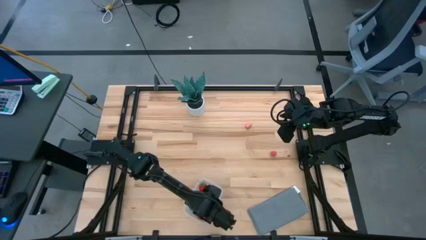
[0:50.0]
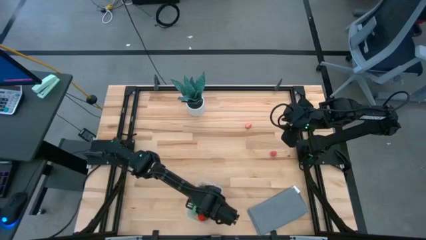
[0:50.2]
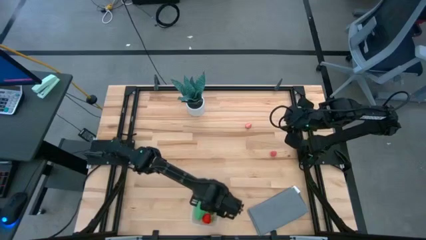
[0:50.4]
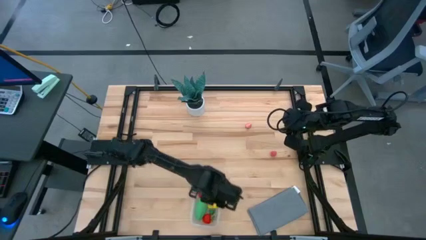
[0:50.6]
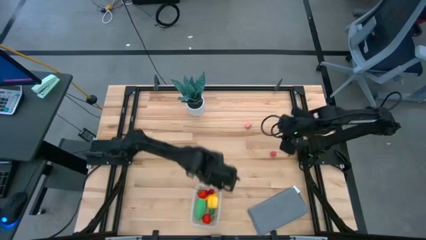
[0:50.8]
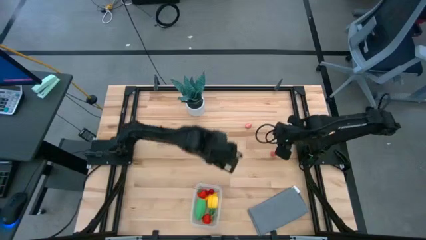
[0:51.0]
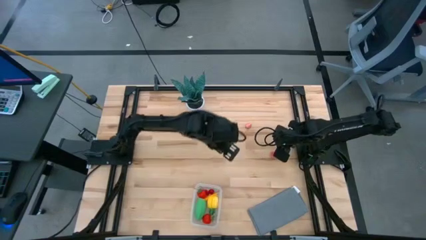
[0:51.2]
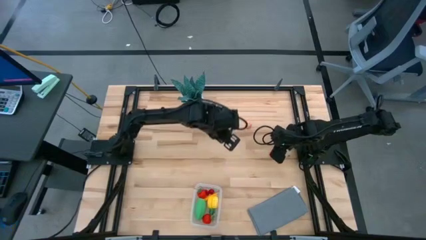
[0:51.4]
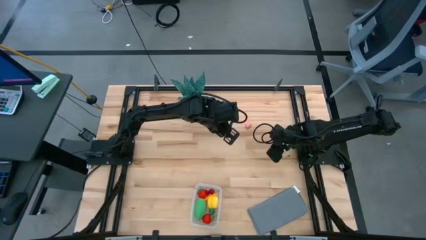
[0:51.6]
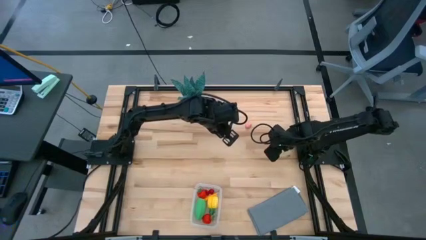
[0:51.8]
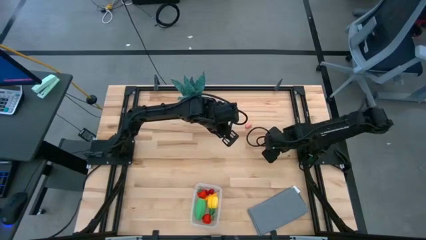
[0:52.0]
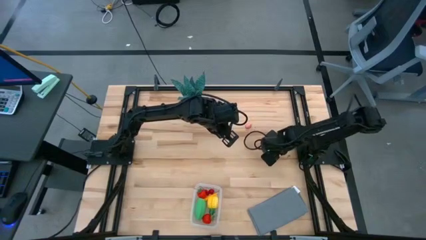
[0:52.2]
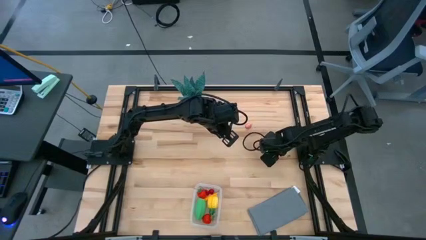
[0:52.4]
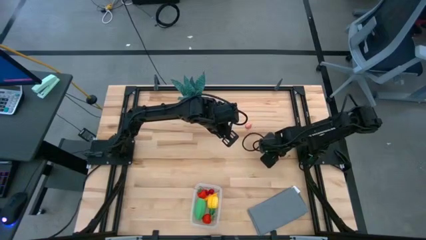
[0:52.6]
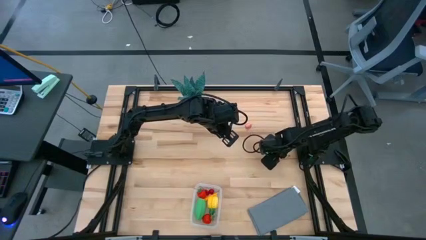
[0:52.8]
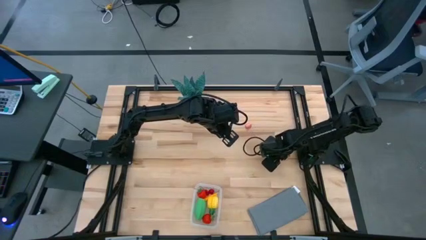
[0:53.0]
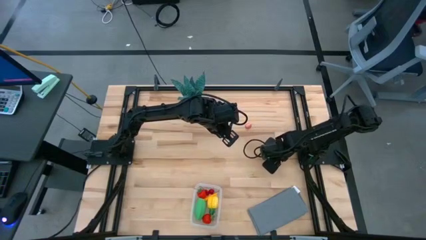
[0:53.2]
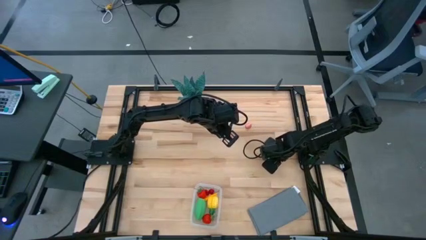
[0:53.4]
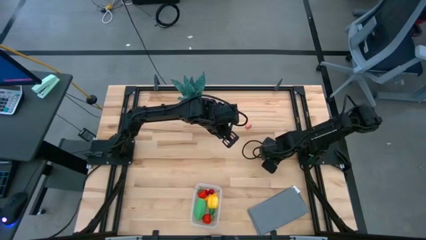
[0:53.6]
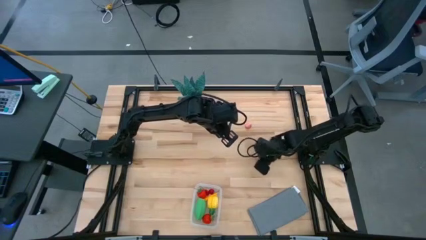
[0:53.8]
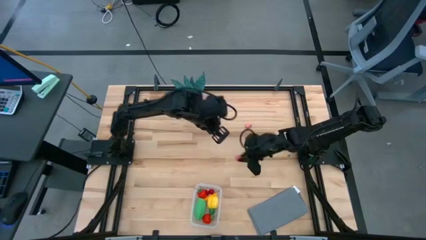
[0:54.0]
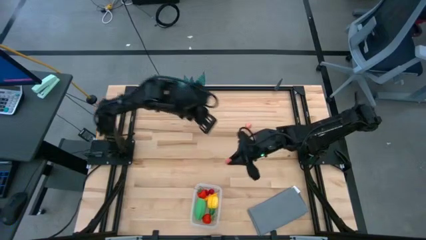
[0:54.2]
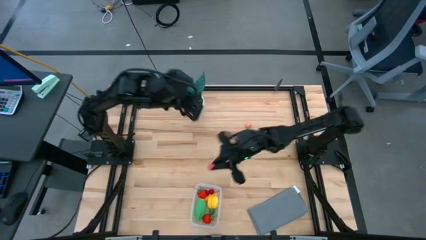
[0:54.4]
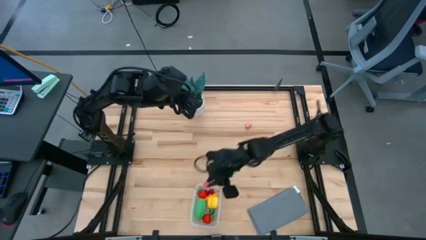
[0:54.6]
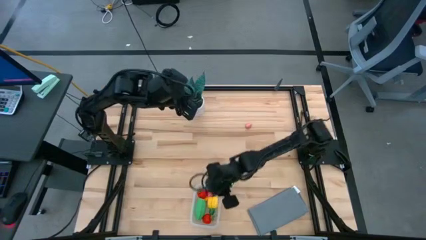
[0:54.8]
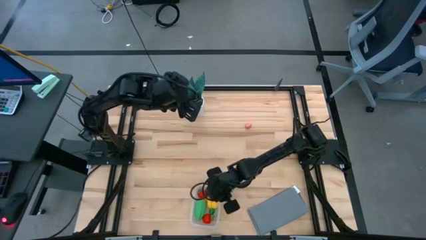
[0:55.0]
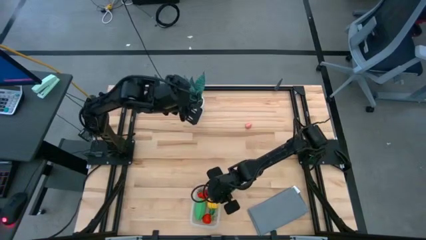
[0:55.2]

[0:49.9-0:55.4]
Task: Pick and placing Produce into tupperware
Put the bottom pink peach into the transparent bin

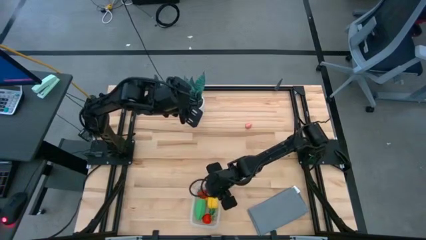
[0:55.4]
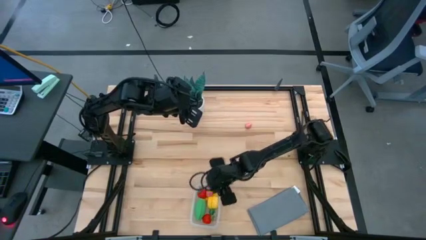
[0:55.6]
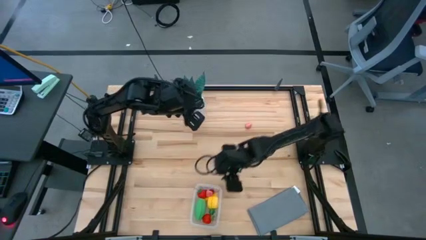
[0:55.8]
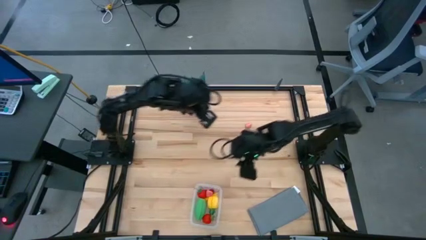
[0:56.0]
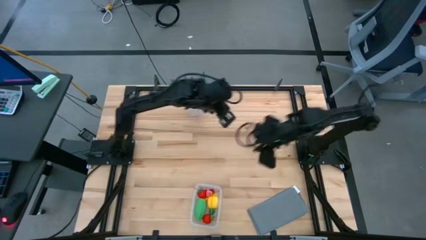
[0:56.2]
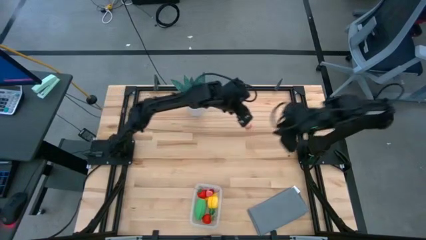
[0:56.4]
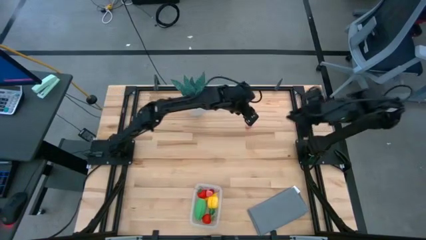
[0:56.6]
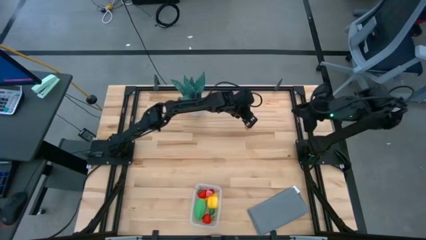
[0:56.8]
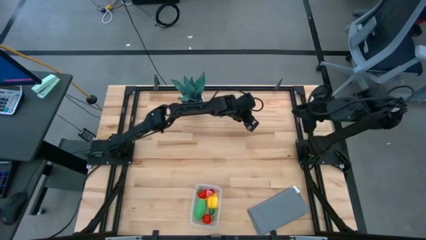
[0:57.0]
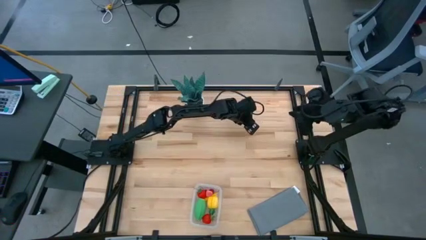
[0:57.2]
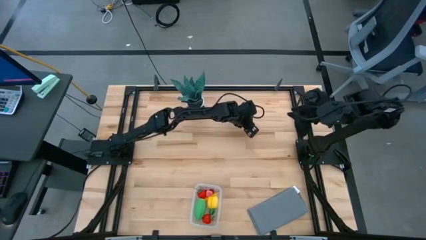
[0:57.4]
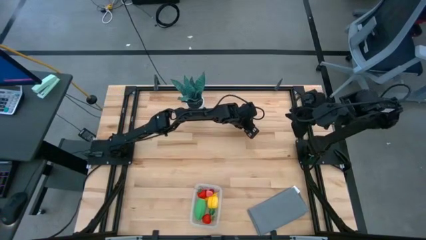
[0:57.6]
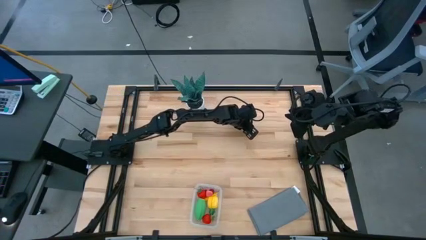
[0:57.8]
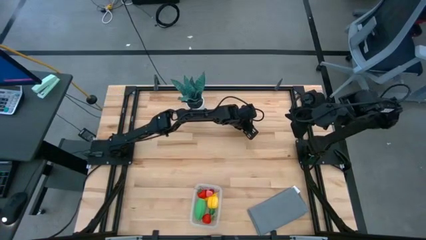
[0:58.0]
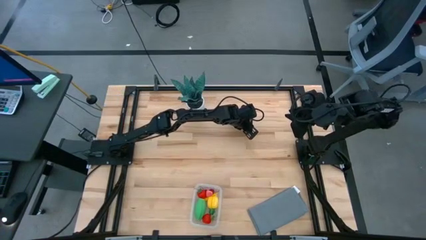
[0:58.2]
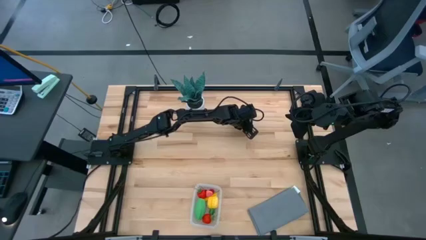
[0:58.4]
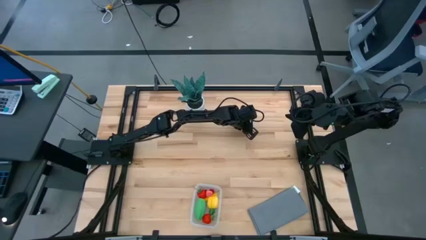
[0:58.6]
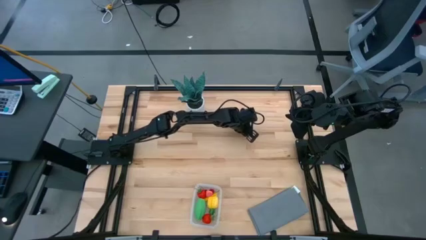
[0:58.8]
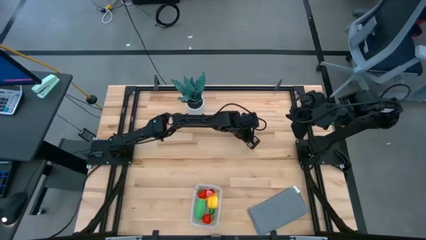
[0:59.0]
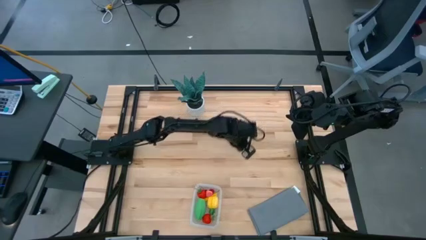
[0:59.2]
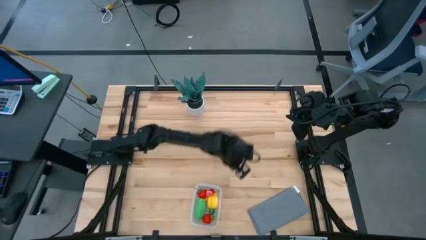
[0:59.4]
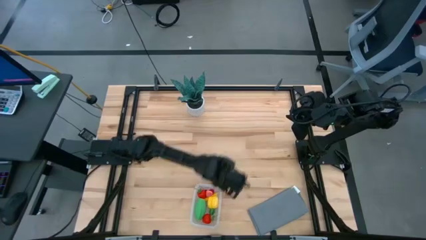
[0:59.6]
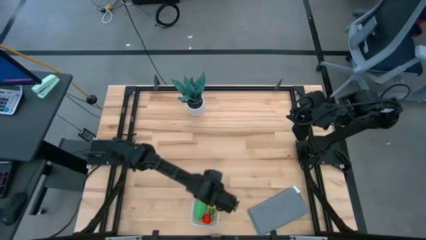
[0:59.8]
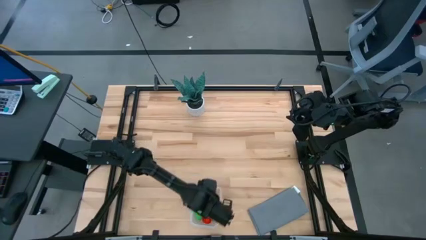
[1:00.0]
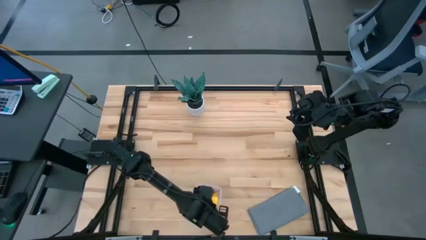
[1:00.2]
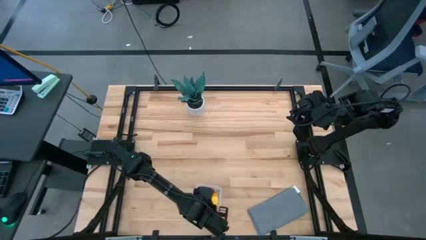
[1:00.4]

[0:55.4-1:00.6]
Put the pink peach into the transparent bin

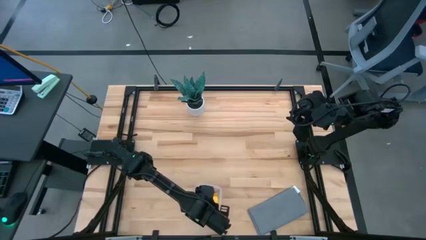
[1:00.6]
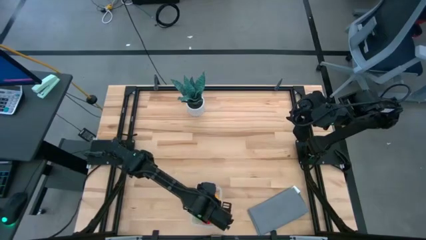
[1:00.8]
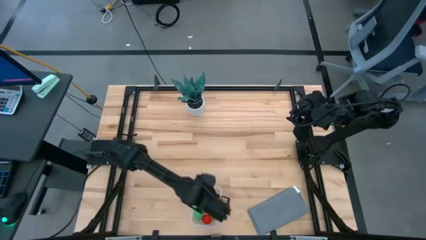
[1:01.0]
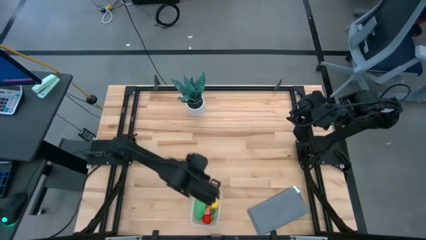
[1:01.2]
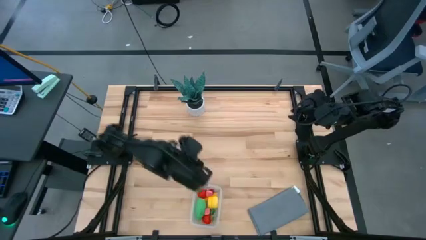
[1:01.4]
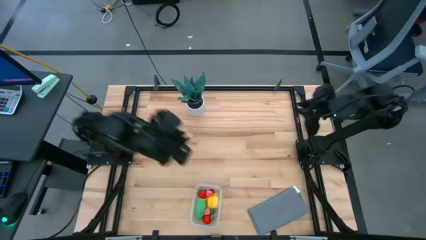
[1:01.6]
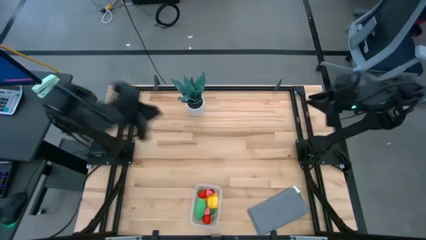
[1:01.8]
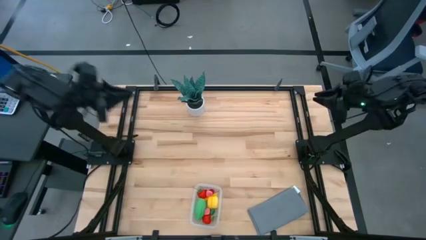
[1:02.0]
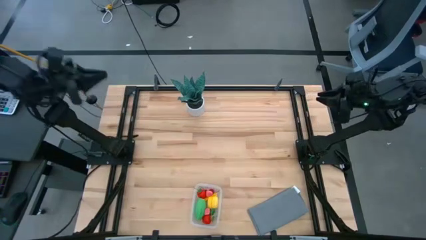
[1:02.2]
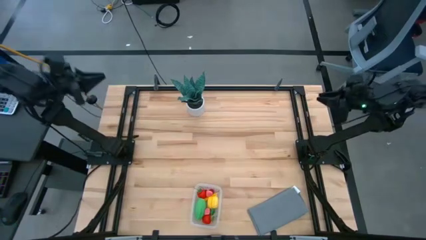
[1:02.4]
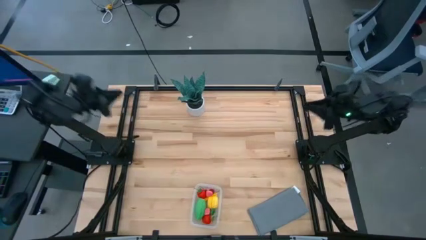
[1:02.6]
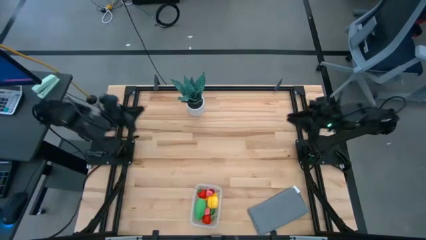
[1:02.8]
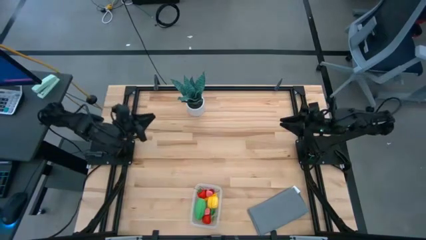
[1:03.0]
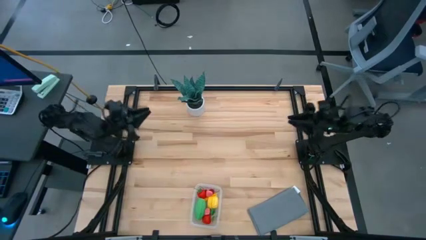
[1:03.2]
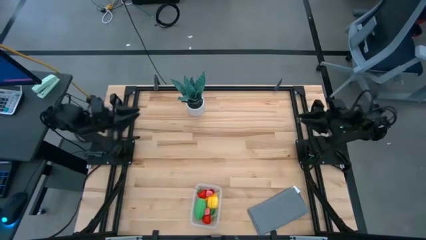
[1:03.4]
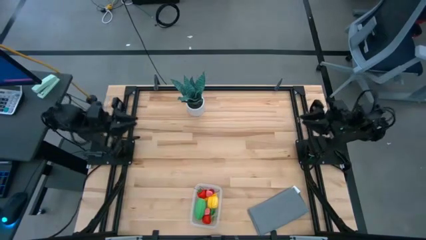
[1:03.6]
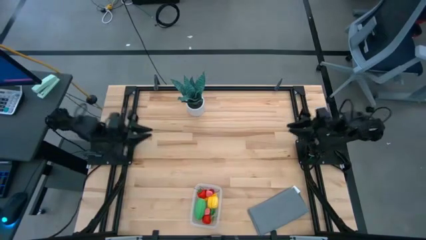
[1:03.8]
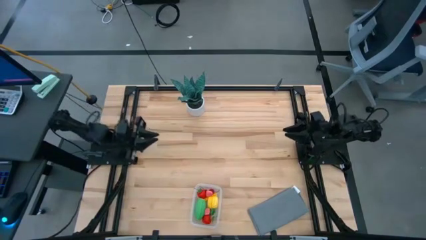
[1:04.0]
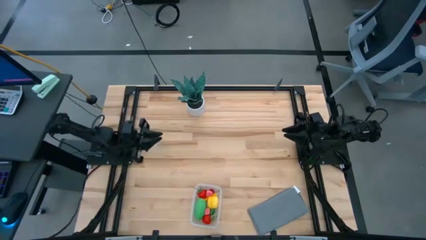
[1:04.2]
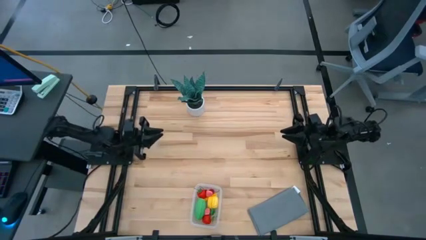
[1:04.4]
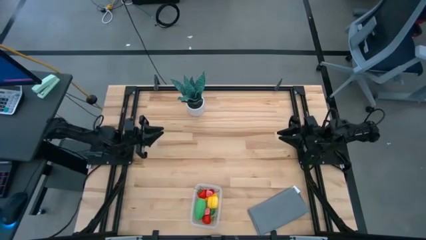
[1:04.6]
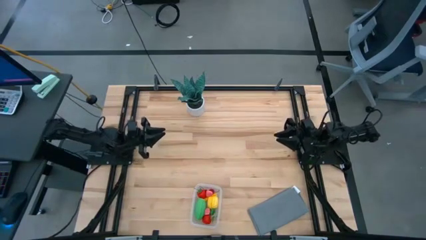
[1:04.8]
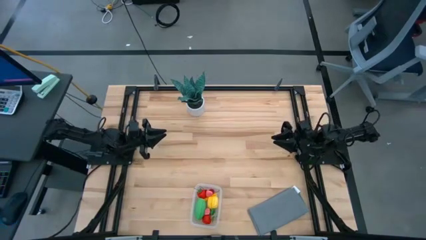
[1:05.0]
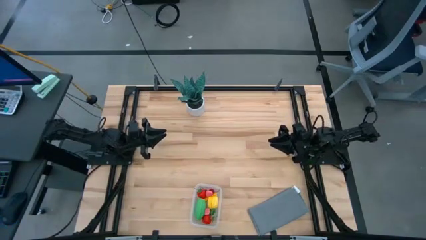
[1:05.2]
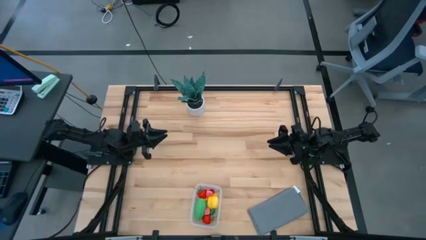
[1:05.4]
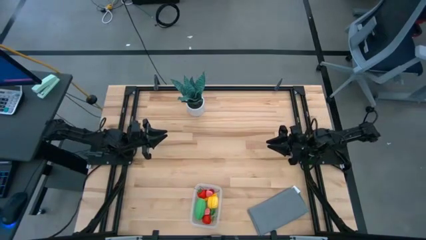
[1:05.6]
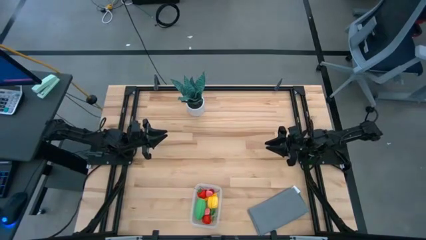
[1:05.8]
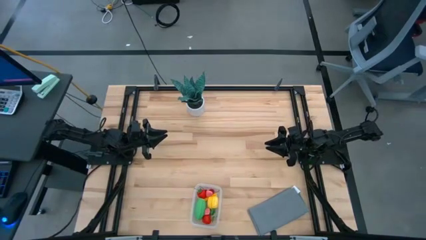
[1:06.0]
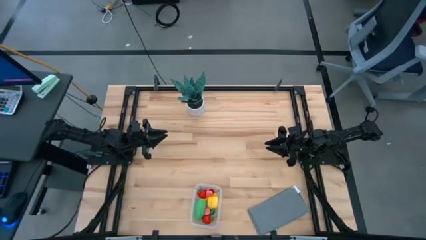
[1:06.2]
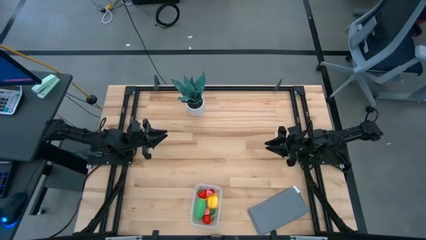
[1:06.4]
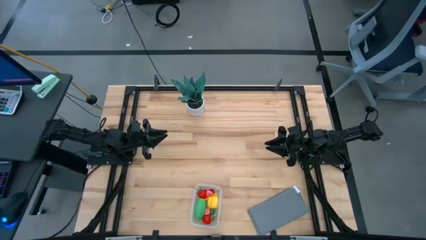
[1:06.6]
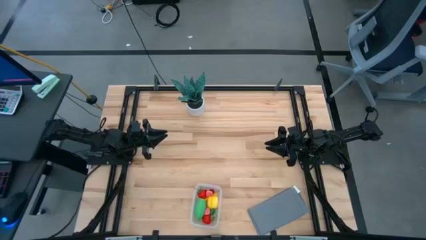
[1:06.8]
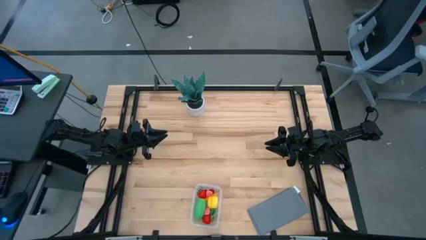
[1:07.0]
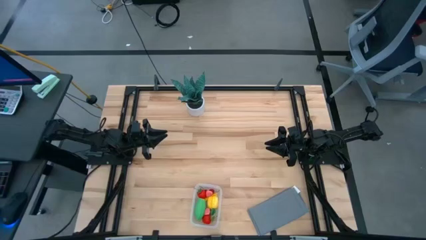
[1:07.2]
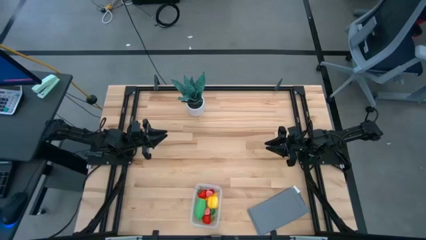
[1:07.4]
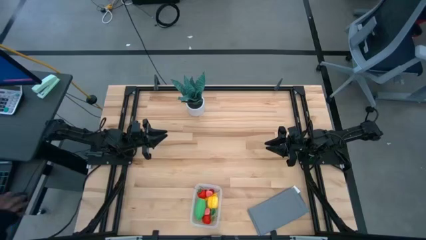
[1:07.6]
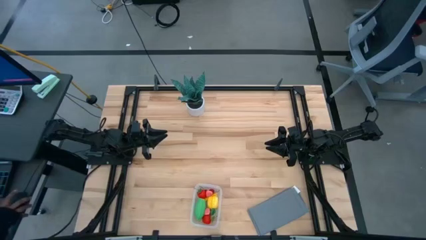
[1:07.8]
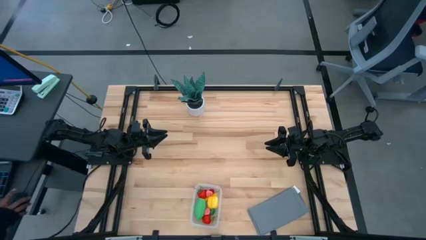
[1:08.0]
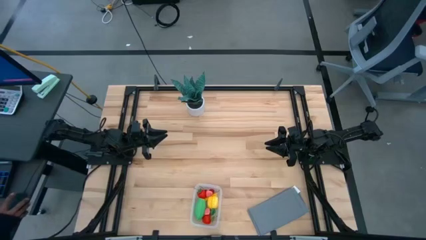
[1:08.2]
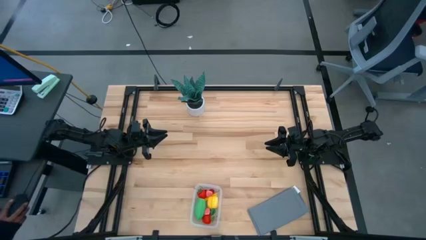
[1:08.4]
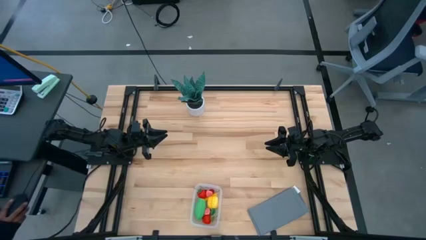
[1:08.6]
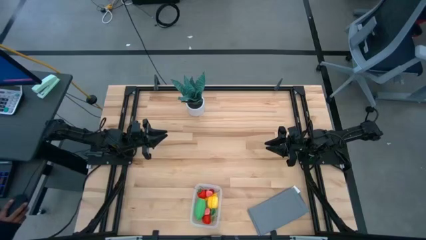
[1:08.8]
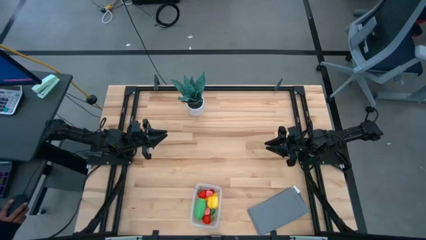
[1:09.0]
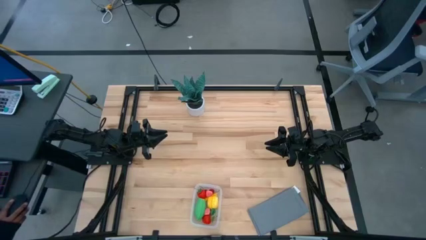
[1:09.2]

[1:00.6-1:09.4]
Return to Home Position
